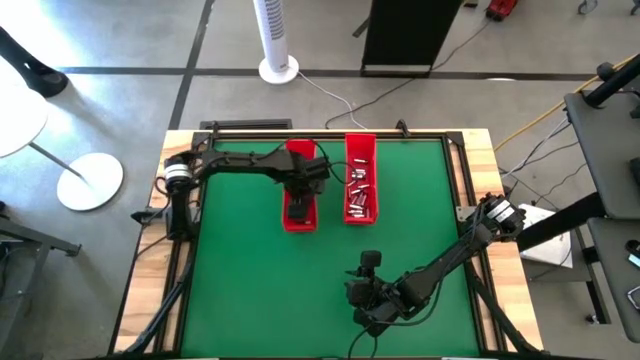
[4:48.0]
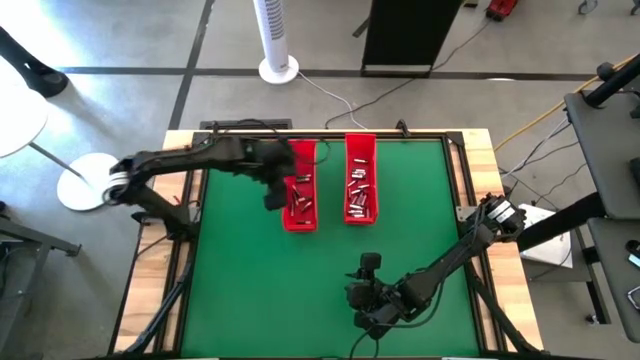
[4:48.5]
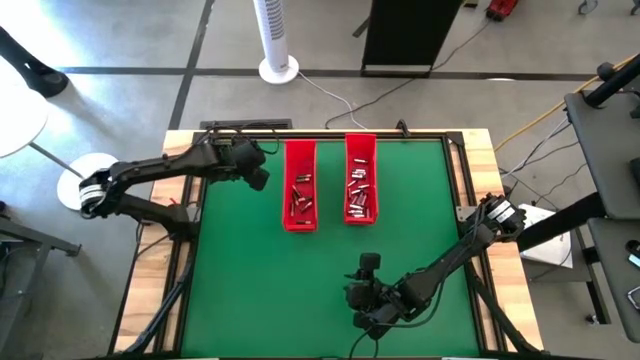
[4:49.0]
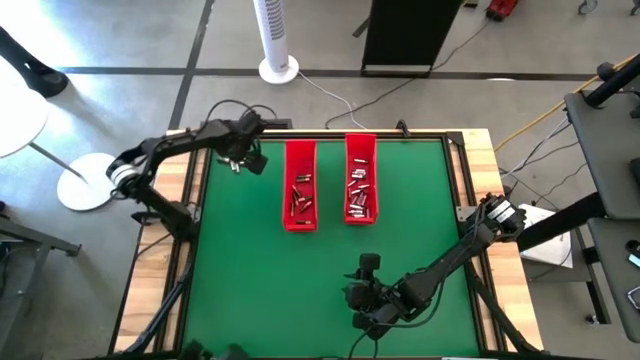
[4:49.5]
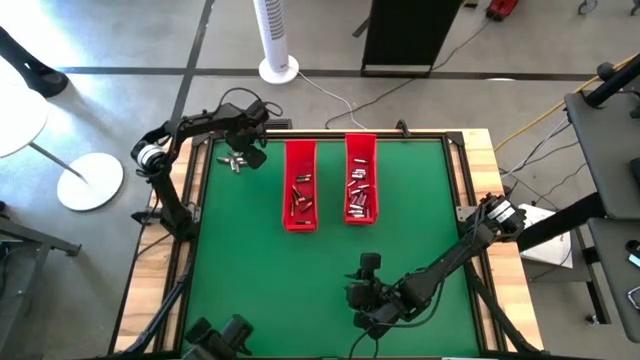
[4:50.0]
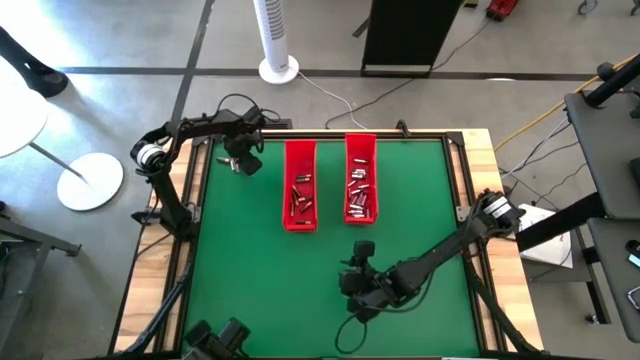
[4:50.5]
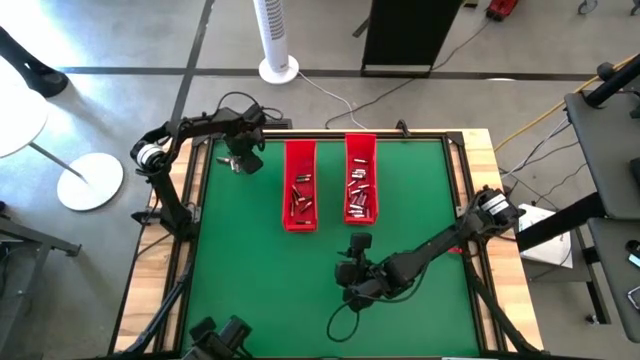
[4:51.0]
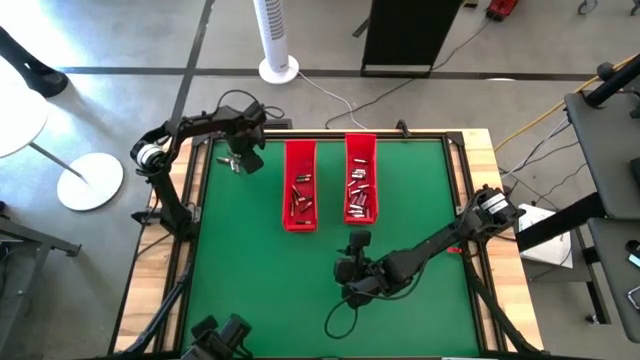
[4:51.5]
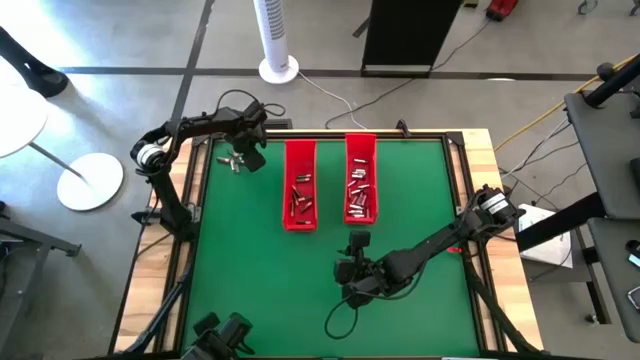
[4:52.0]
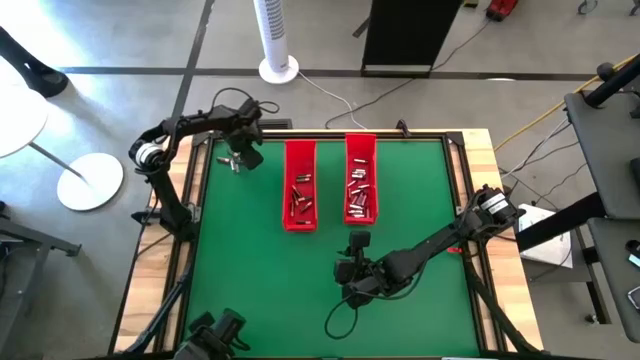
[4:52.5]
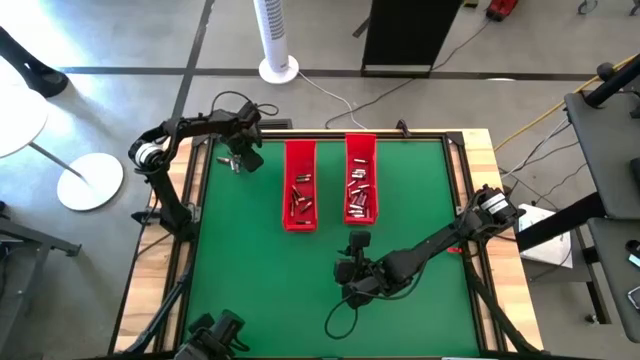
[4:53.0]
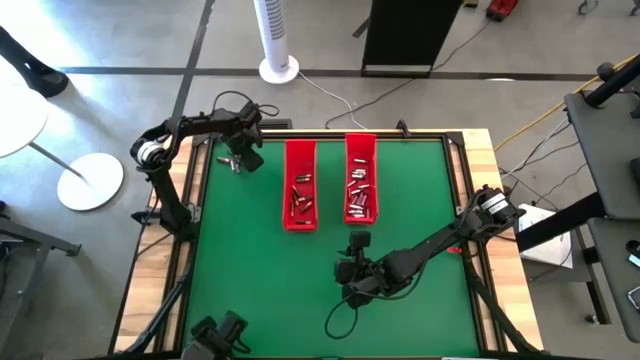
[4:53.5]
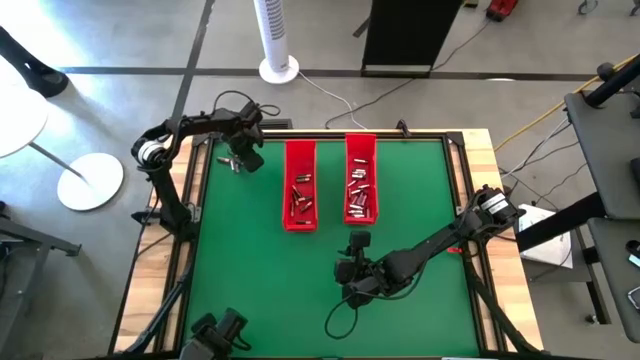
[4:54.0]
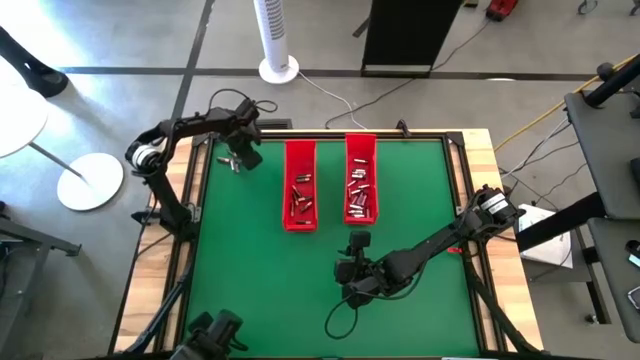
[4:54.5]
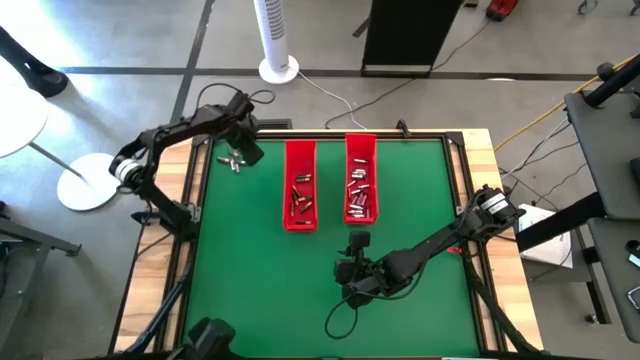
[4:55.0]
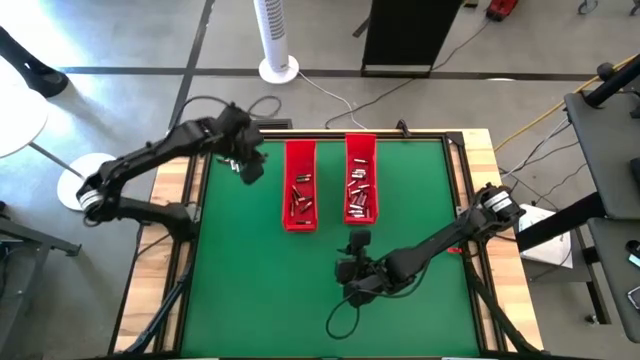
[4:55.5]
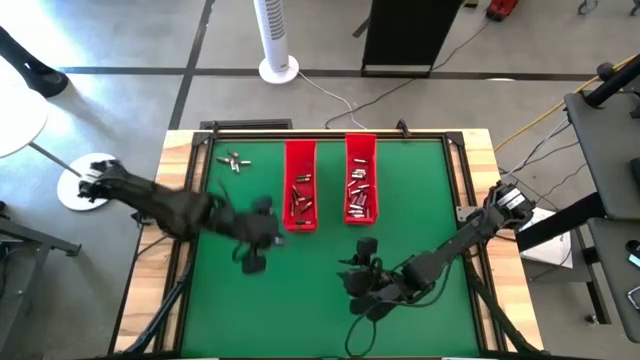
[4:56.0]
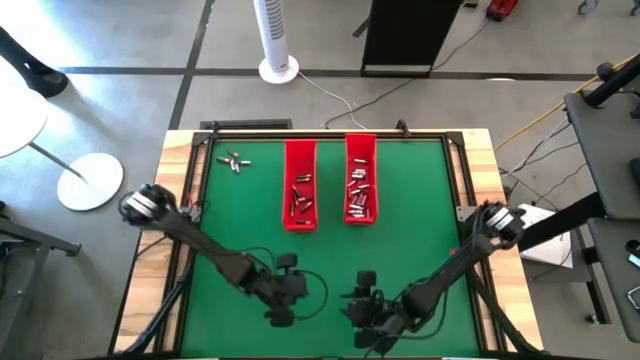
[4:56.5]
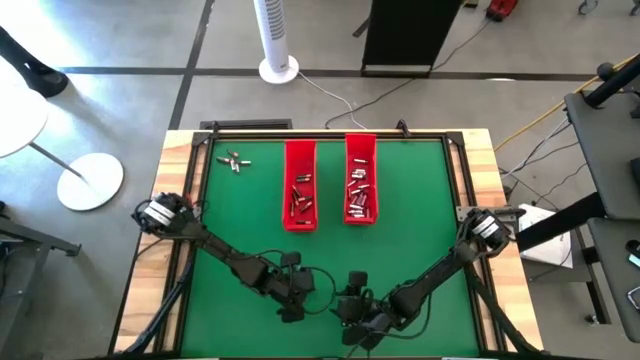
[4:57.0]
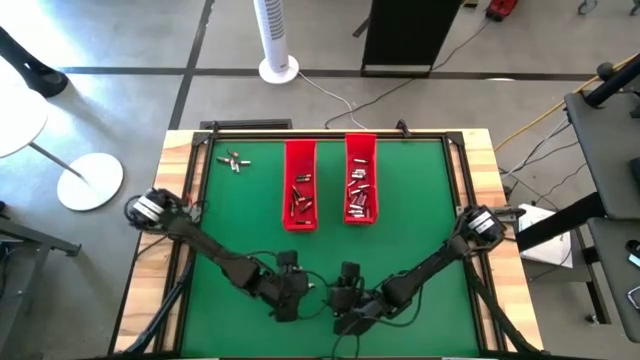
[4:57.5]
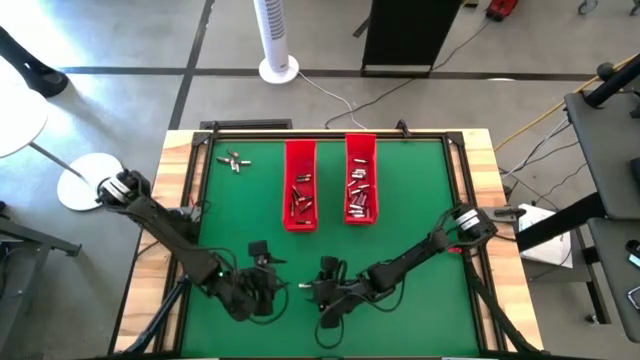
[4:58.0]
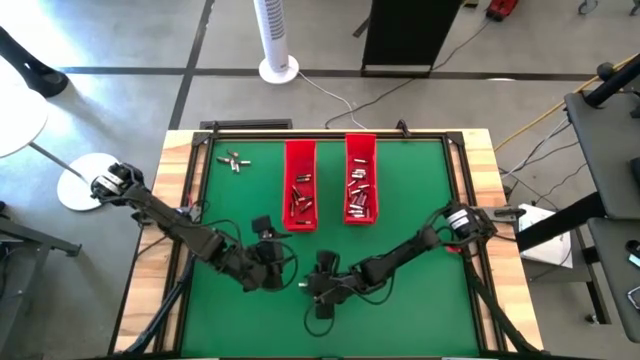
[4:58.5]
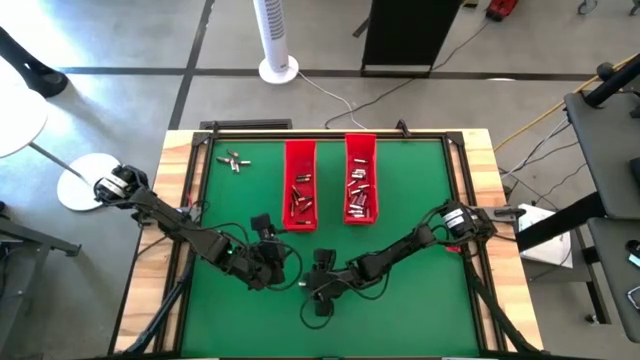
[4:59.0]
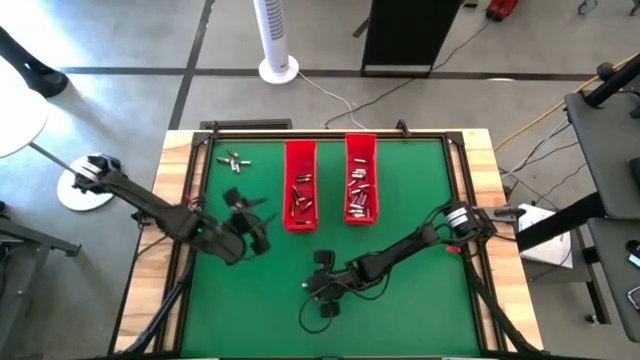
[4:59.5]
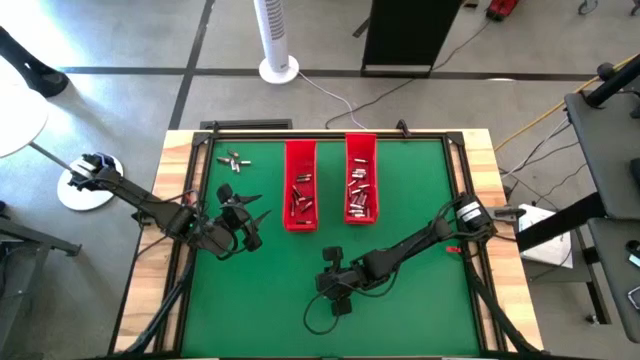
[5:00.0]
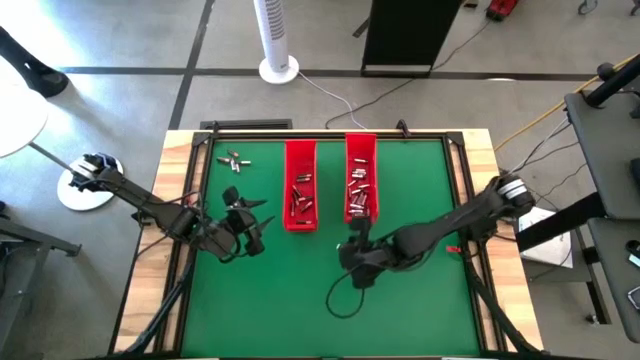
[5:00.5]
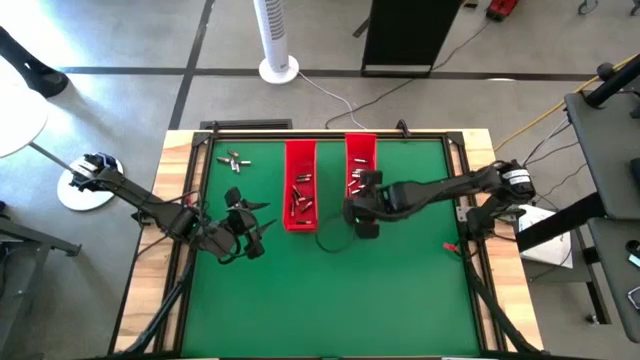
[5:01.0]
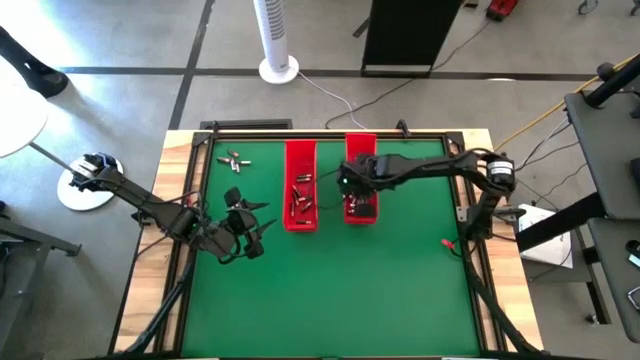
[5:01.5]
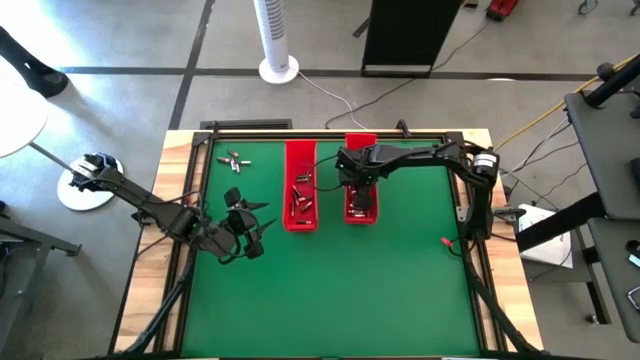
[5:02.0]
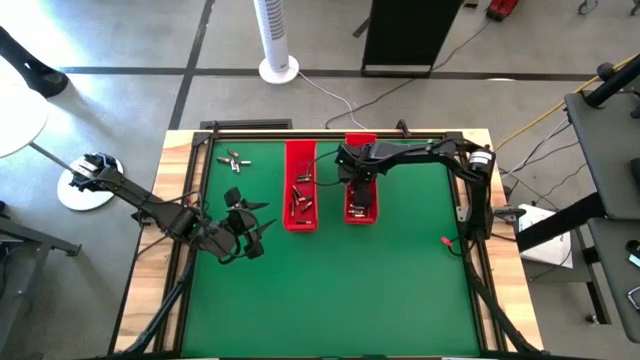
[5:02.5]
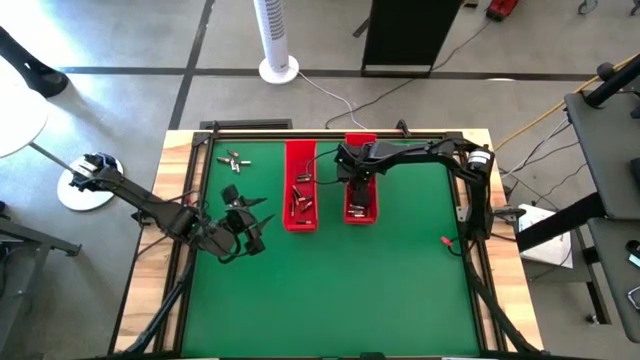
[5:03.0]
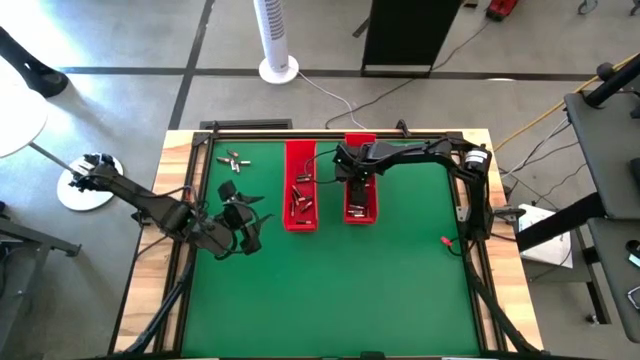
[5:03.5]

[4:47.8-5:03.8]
Task: Sort batteries
Put the silver battery into the right red bin

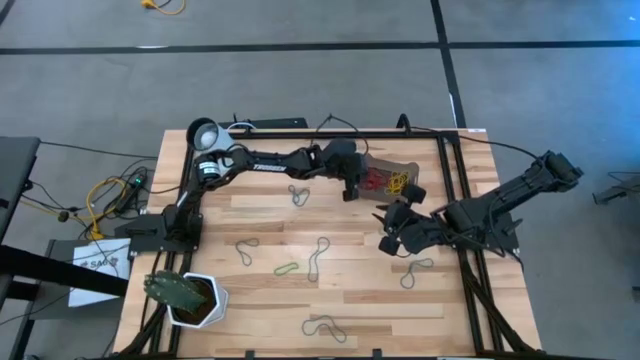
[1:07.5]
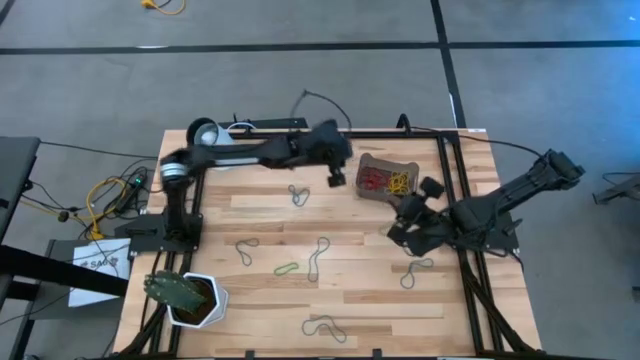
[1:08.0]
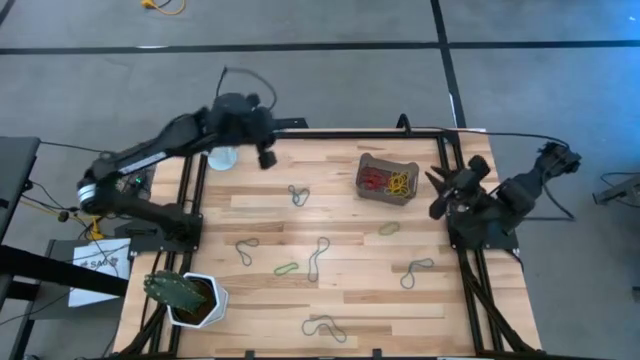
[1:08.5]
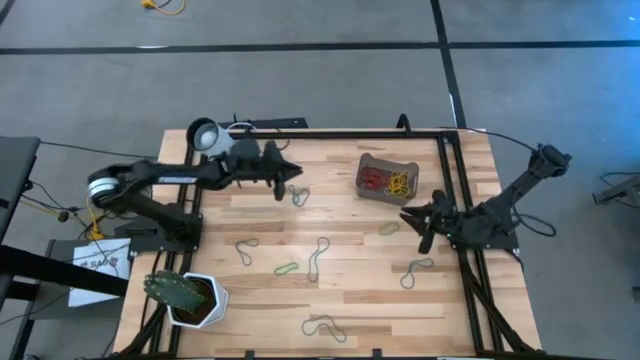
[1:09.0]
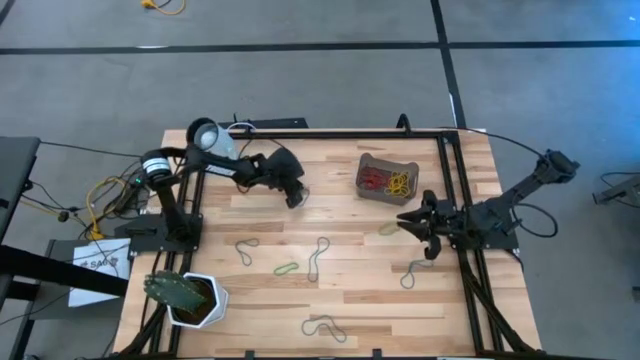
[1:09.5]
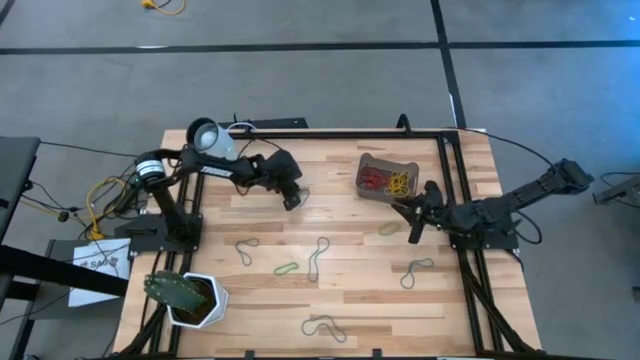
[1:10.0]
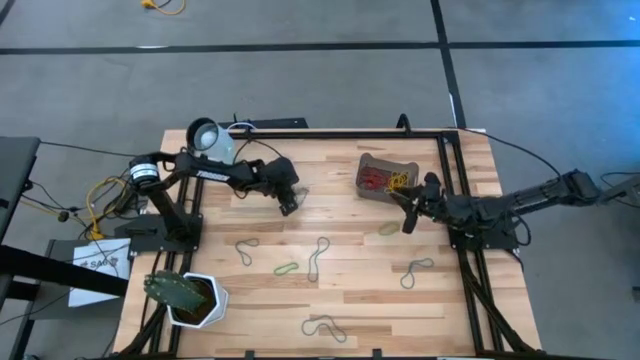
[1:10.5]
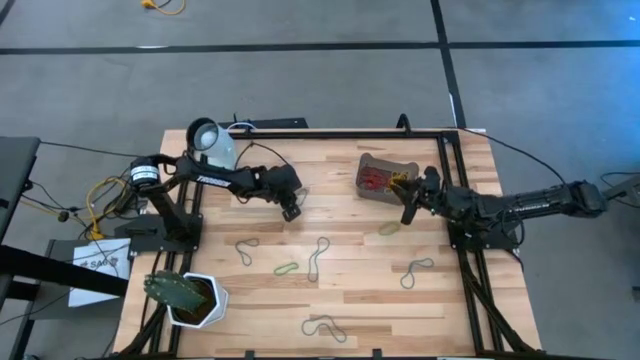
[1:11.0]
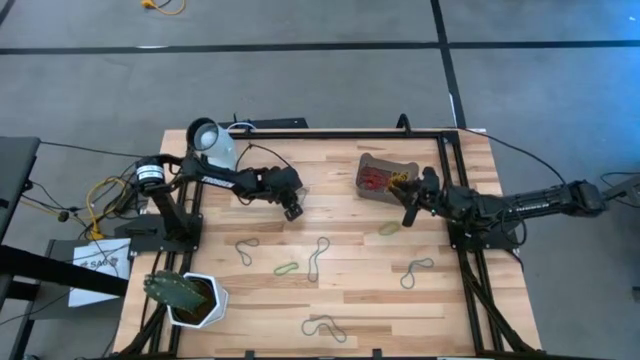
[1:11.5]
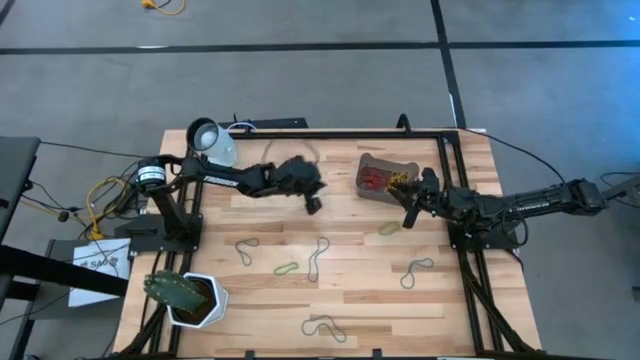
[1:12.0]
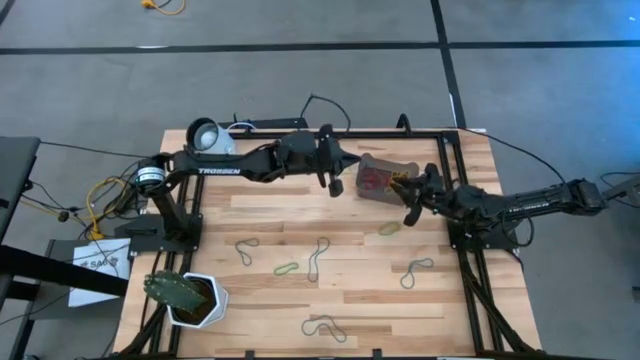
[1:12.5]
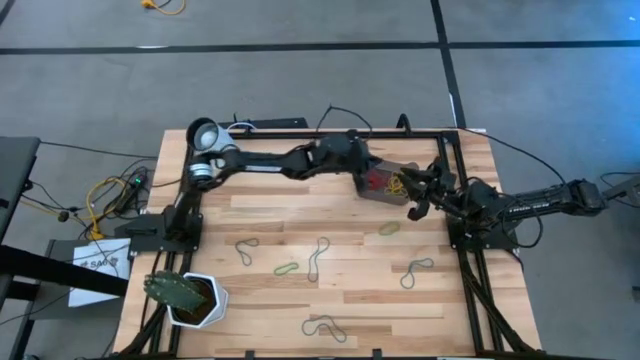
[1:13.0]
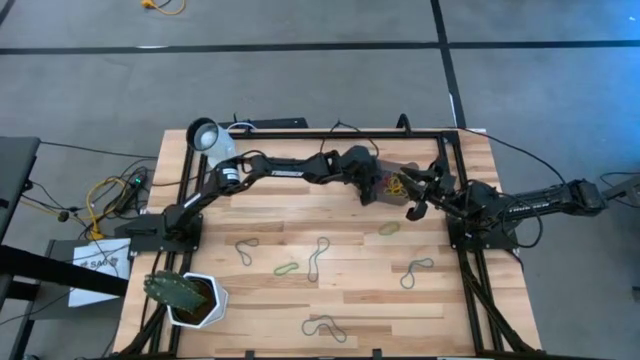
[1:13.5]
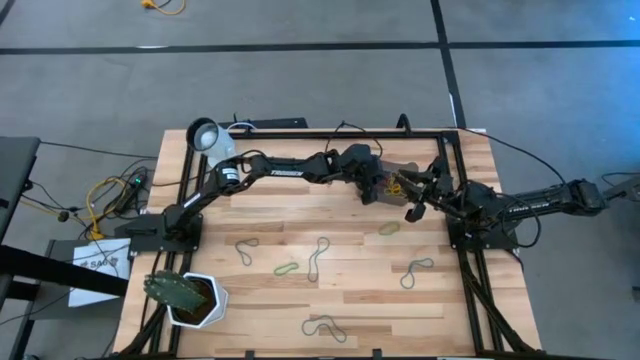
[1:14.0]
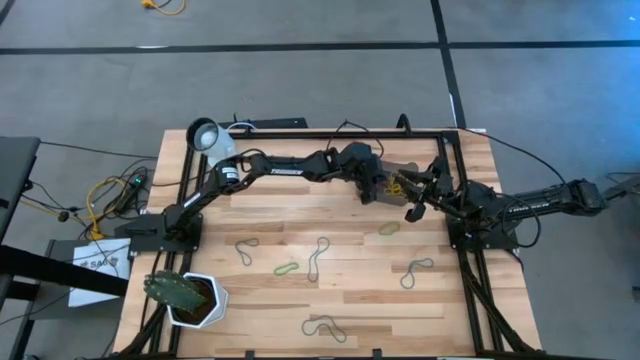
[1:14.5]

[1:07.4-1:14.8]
Task: Pick and place rubber bands into bin
Put the blue rubber band into the black container
